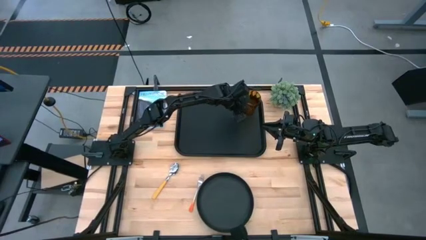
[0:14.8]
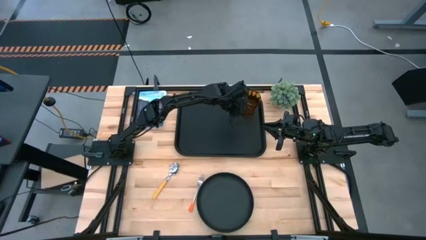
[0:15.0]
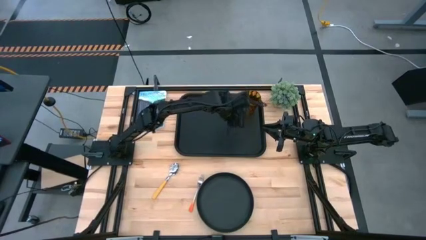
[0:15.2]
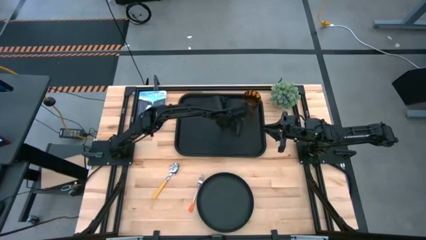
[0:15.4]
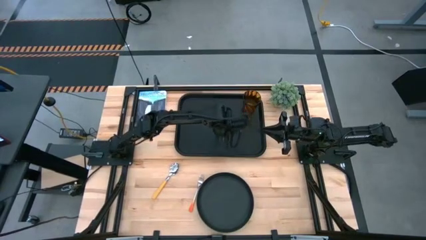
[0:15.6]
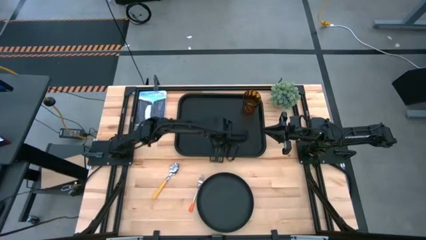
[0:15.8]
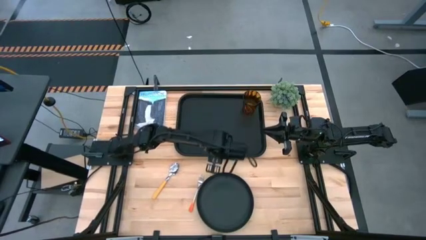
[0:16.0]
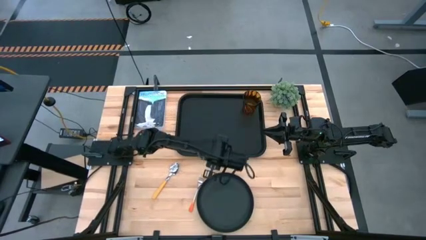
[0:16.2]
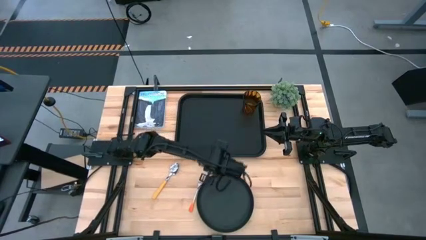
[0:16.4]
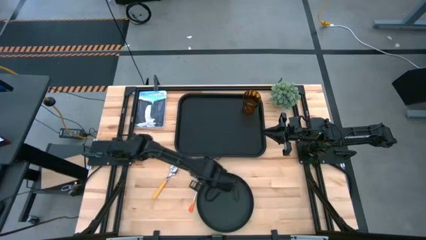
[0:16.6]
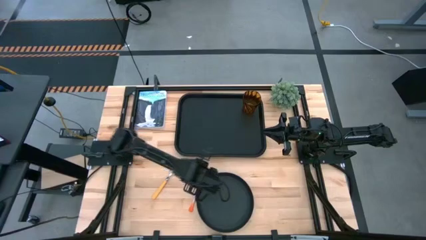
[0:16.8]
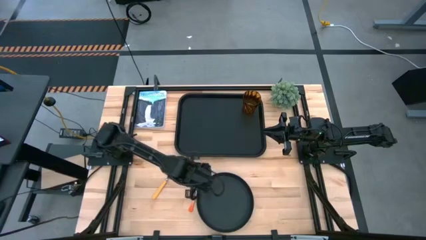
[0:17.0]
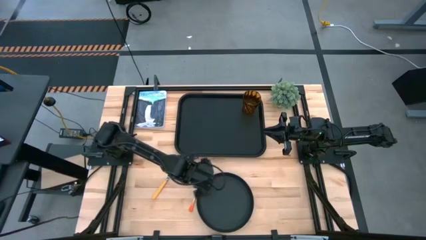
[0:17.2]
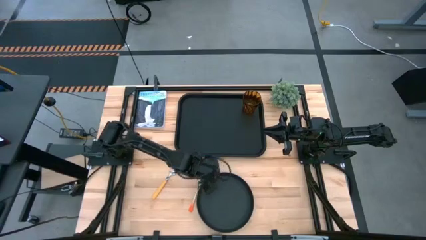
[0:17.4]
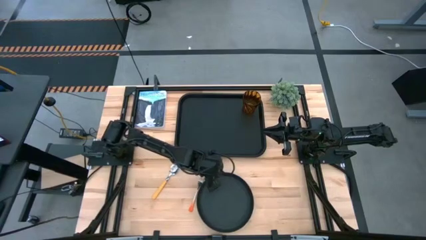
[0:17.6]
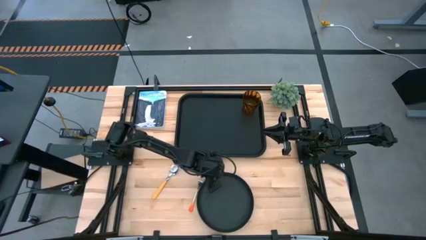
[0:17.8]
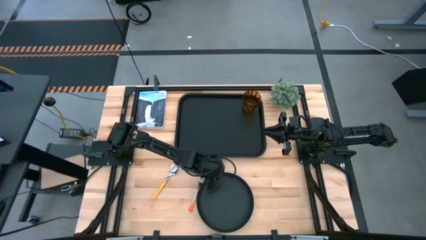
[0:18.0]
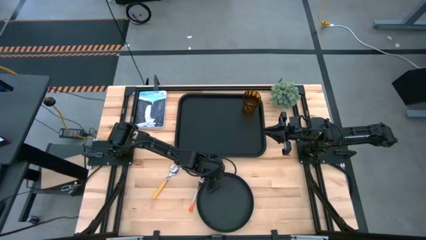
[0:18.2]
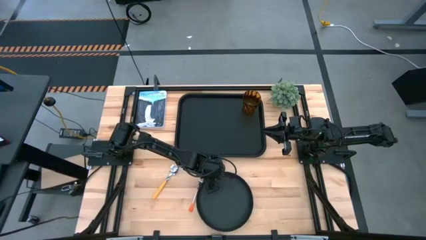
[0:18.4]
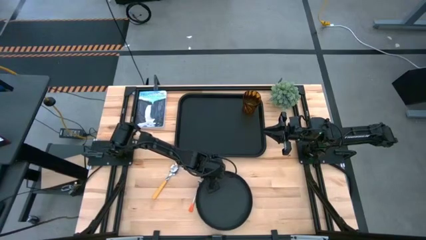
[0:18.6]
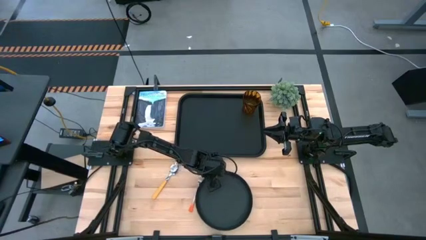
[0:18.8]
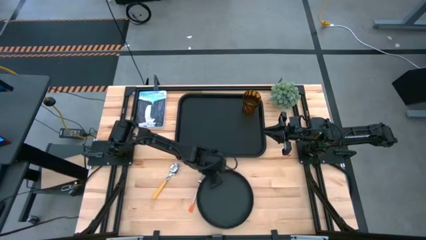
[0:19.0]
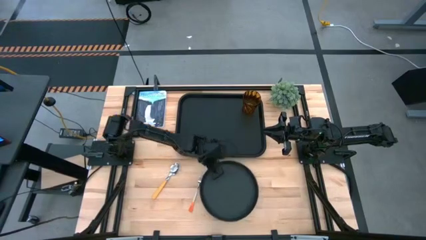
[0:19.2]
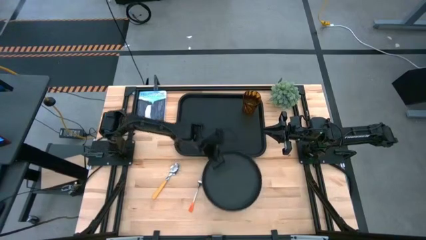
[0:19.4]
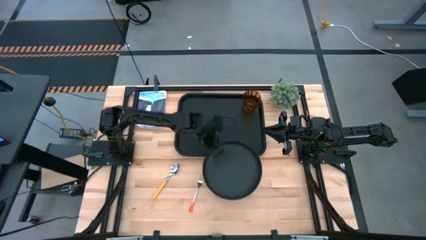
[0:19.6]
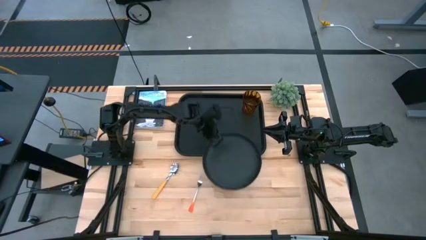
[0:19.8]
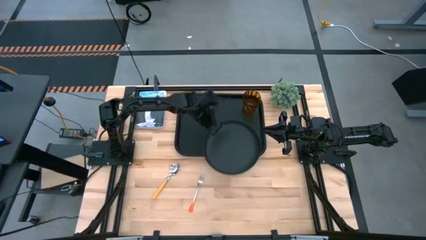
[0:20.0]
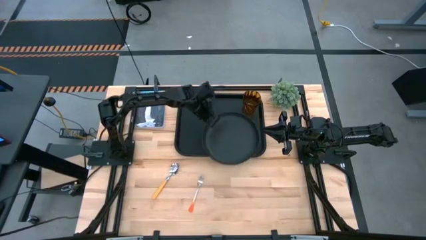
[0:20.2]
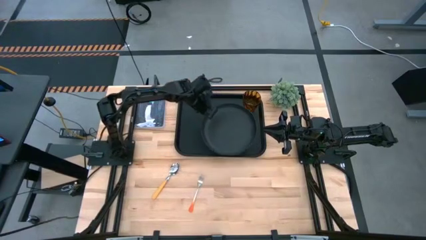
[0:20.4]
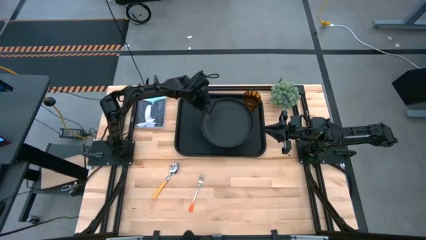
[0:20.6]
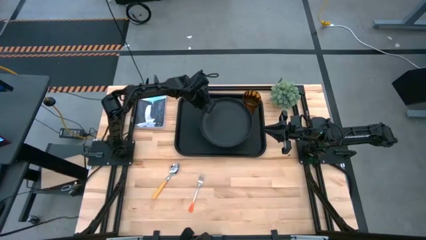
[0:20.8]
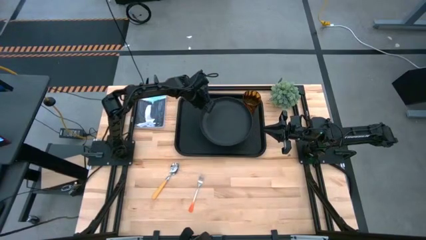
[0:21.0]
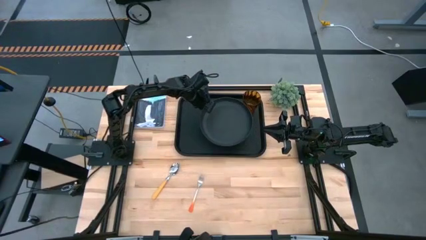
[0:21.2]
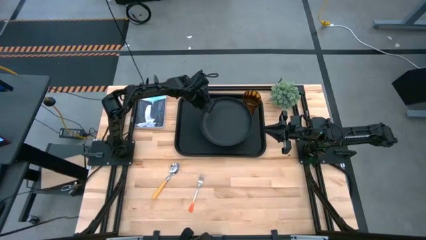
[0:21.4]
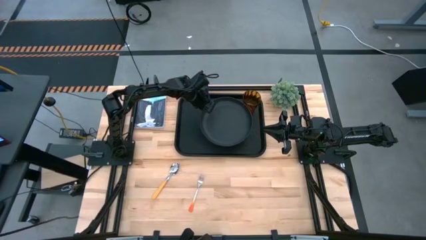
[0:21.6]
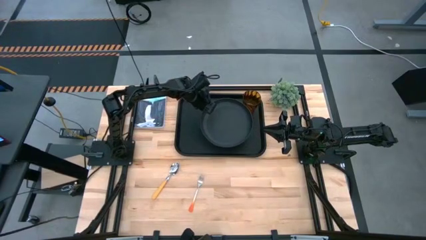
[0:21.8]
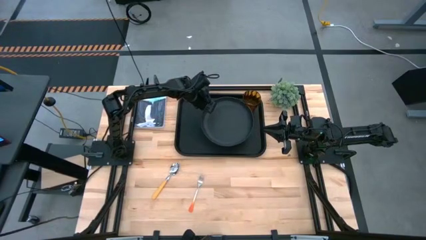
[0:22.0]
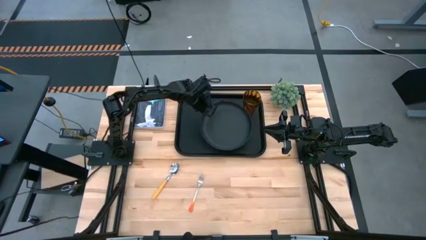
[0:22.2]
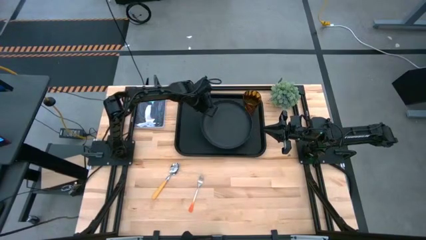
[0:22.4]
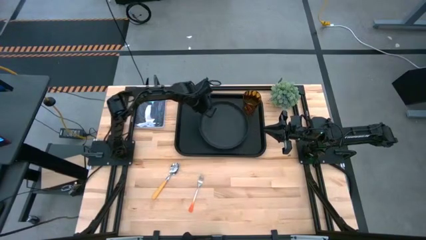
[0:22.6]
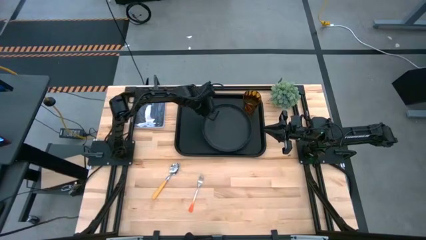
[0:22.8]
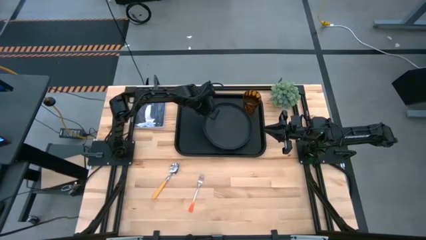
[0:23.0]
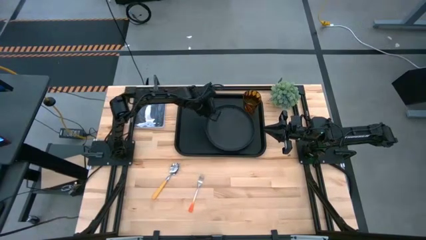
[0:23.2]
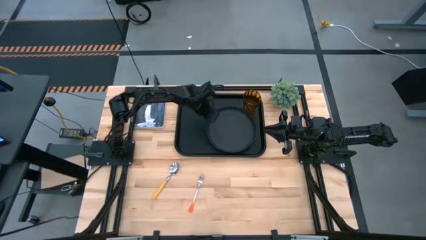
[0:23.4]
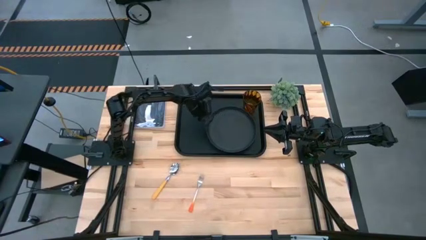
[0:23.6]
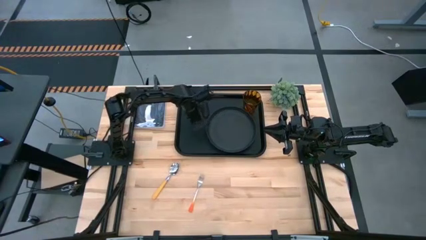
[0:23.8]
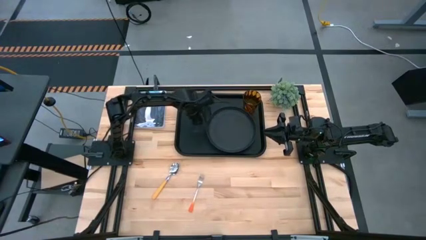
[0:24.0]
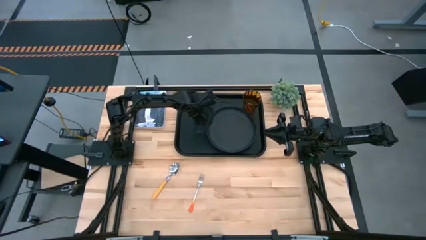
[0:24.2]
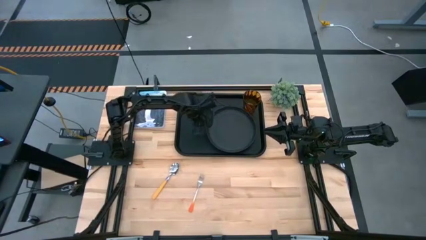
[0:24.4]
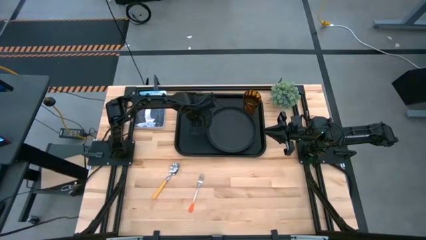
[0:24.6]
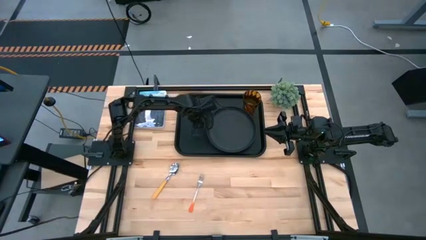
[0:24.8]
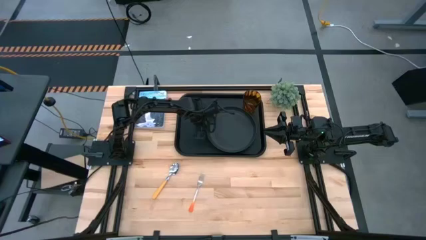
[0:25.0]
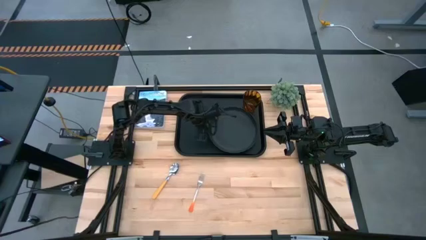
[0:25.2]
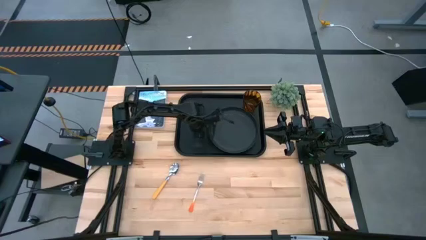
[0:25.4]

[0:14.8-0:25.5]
Task: Pick and place plate/cup/fork/spoon on tray
Put the black plate on the black tray

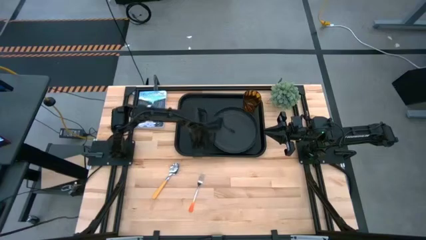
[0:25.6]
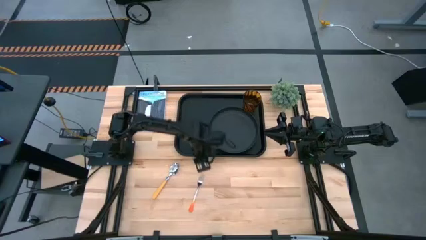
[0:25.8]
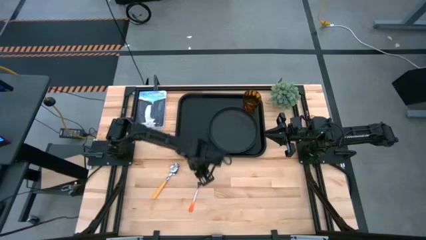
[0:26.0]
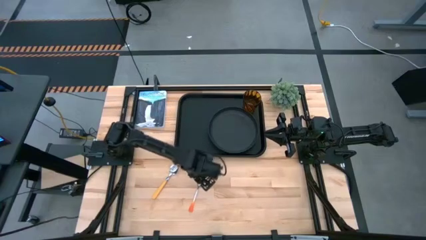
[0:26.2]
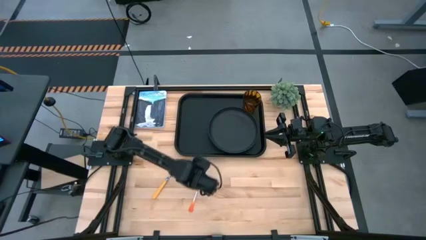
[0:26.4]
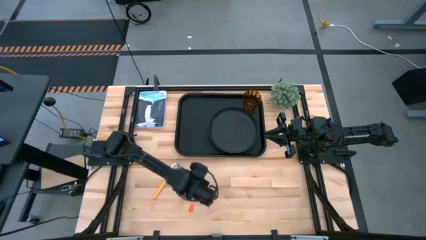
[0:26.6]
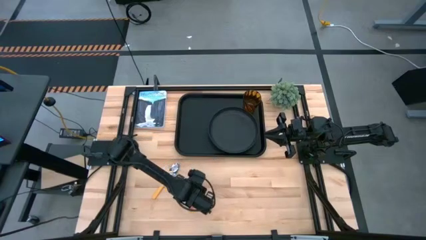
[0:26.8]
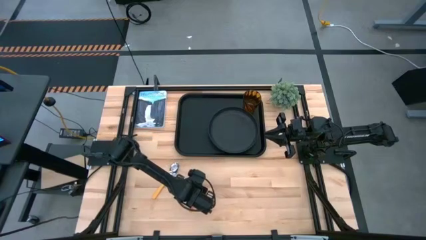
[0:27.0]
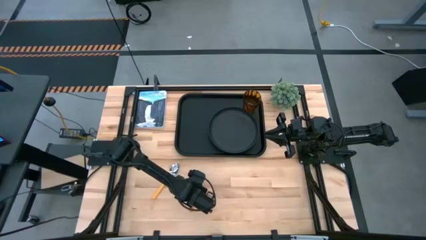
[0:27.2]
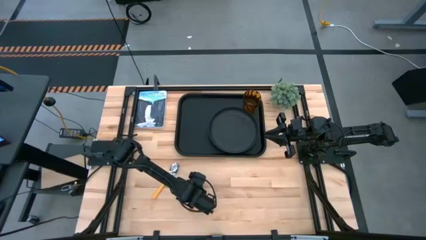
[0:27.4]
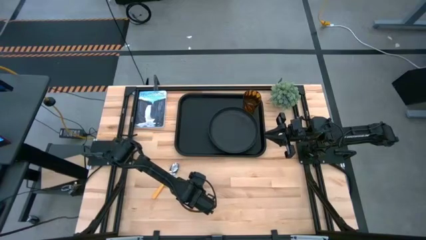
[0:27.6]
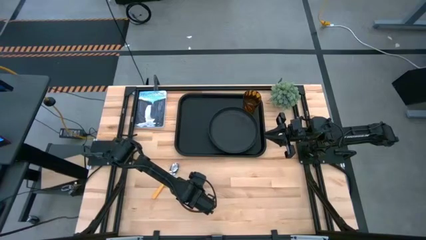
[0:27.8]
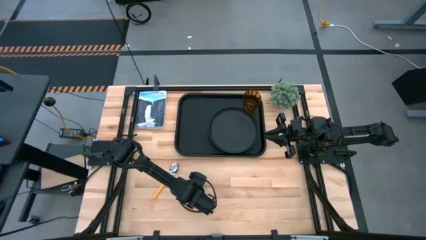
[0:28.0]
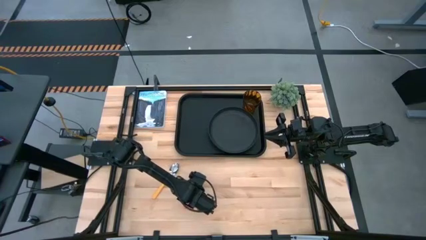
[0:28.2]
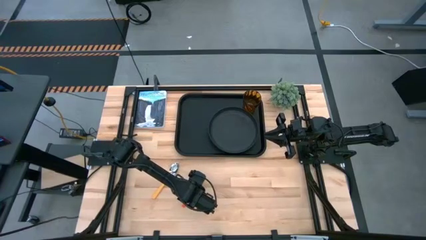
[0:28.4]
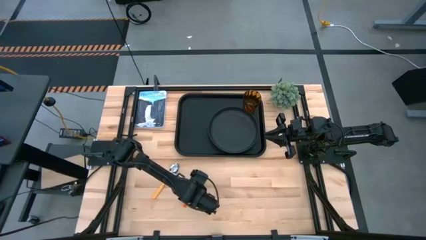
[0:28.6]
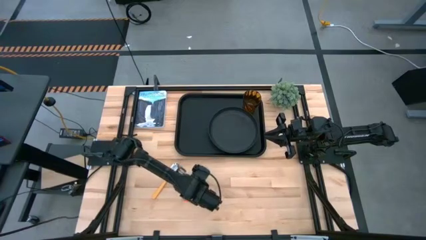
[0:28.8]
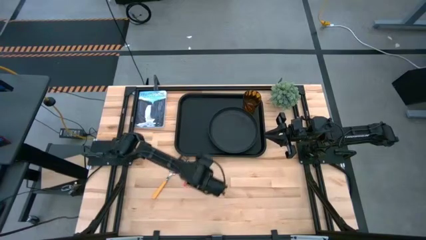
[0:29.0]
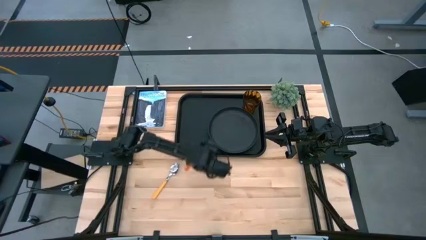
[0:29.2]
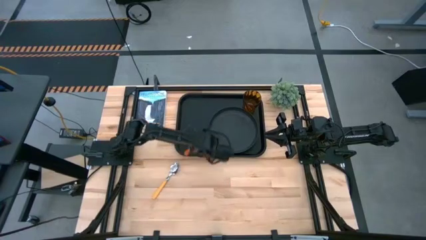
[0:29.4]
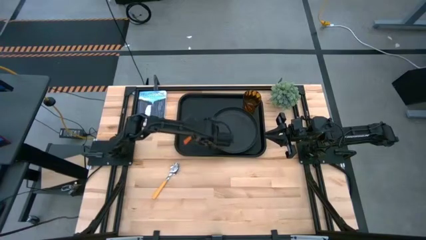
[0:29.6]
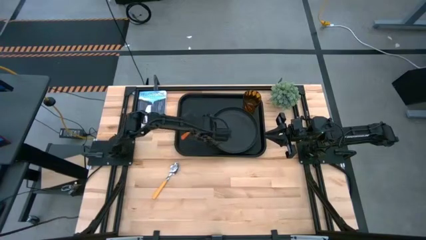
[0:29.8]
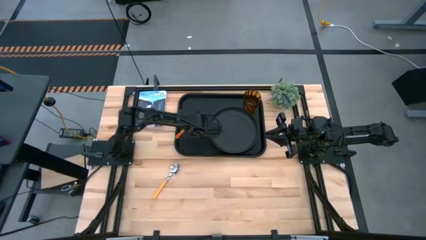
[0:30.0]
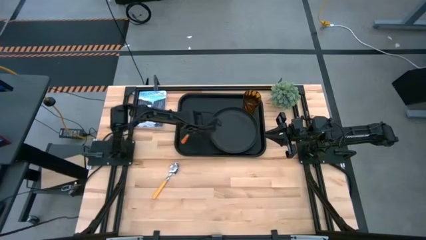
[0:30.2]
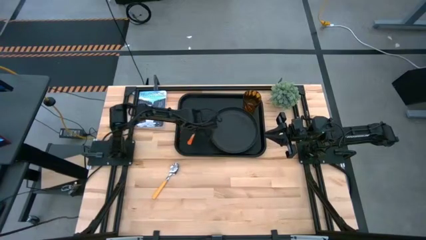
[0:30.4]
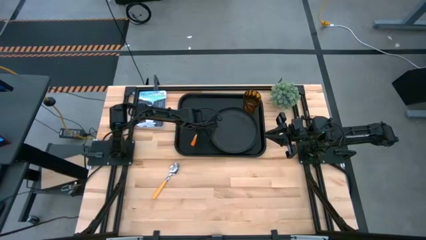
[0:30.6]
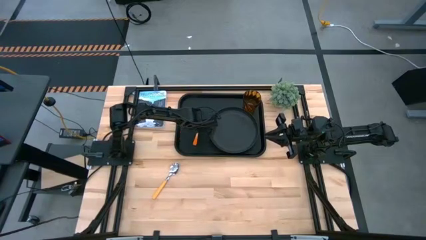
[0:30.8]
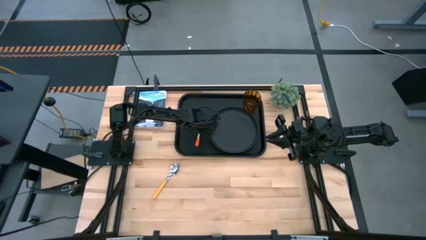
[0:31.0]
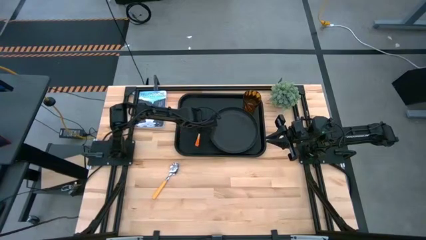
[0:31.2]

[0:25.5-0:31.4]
Put the orange fork to the left of the black plate
